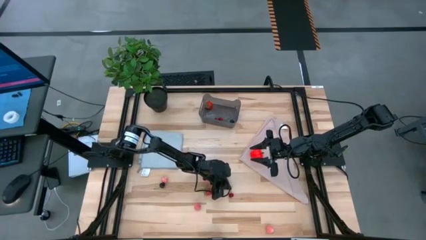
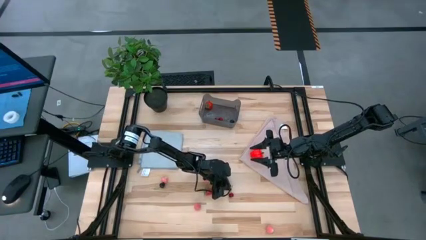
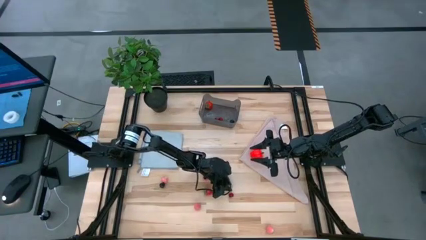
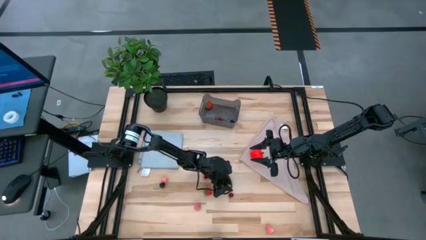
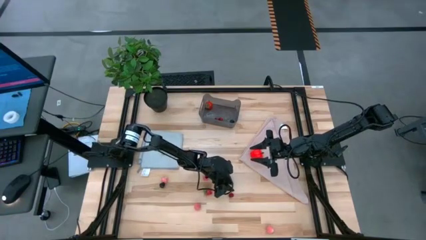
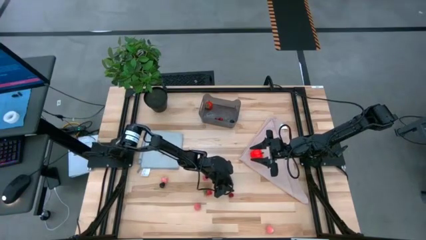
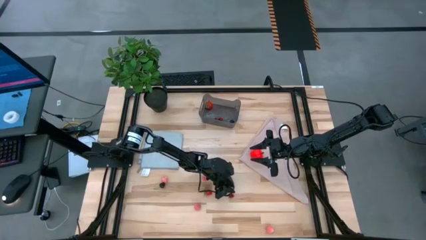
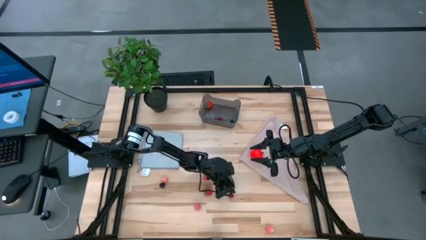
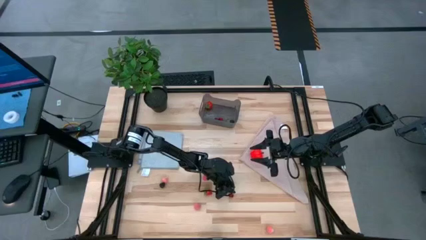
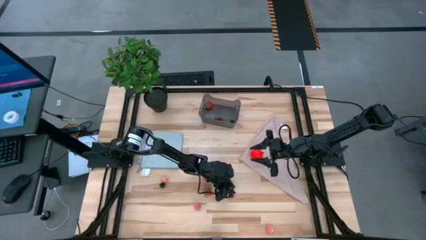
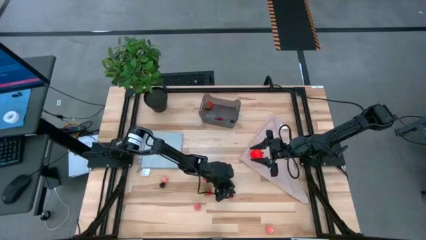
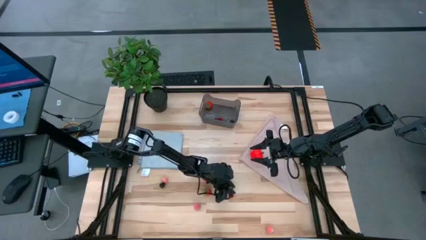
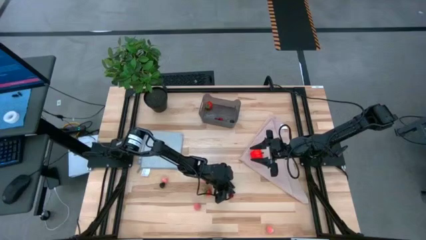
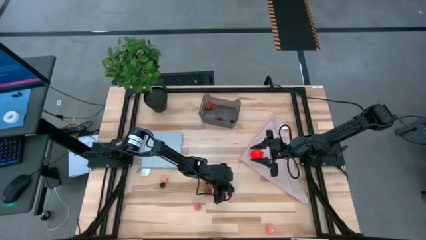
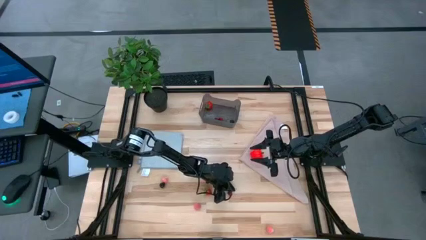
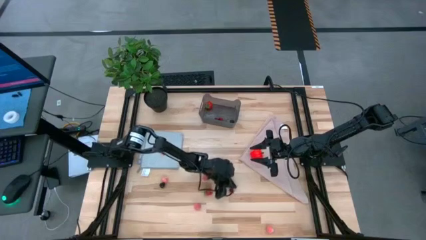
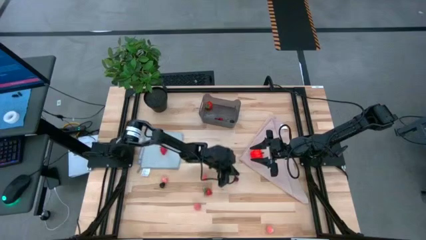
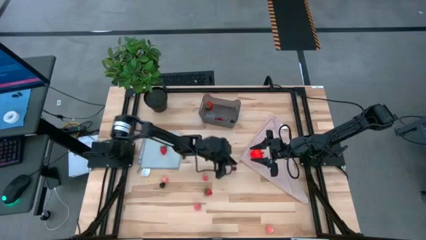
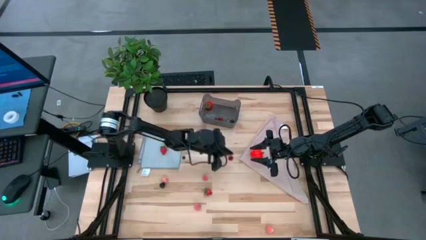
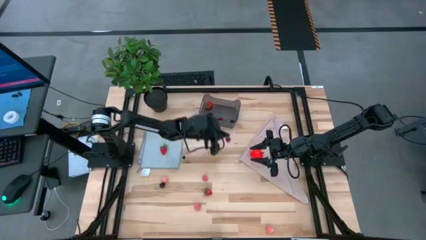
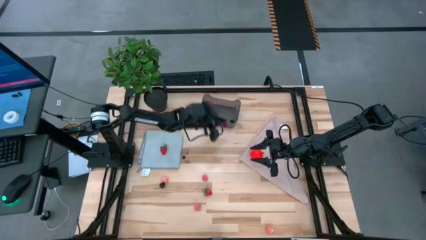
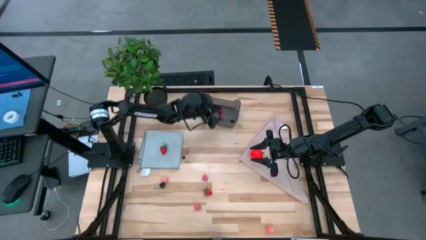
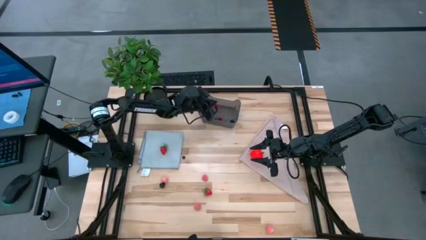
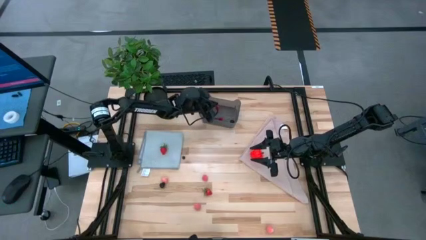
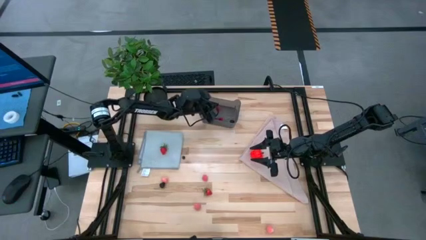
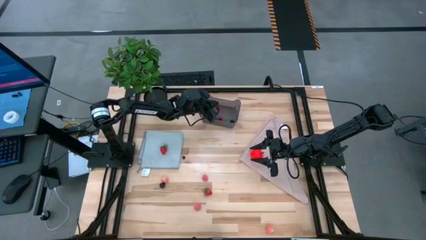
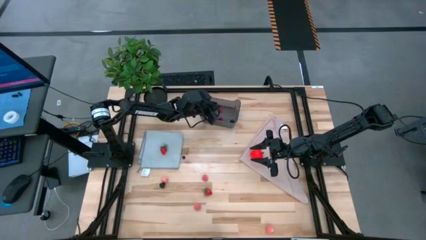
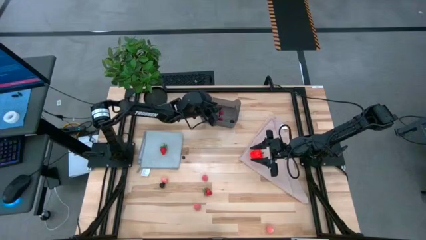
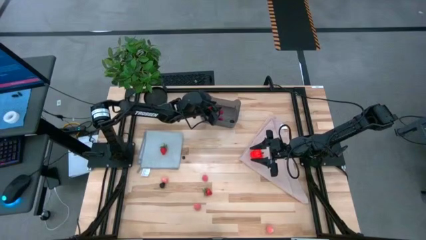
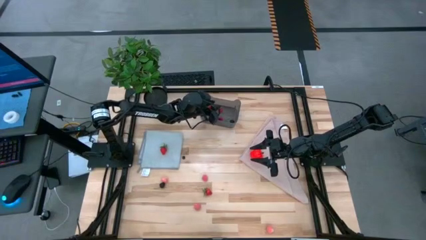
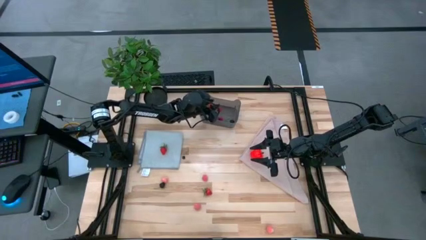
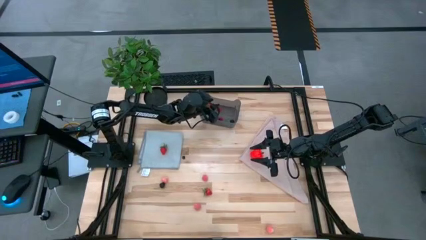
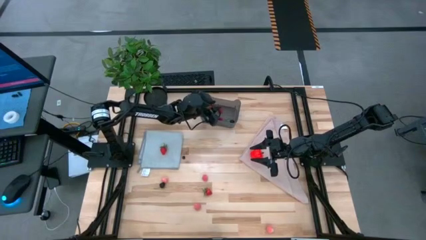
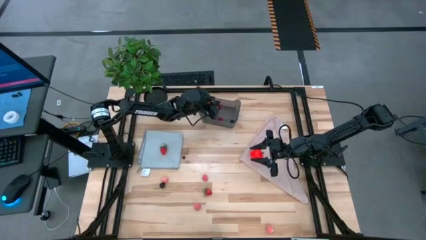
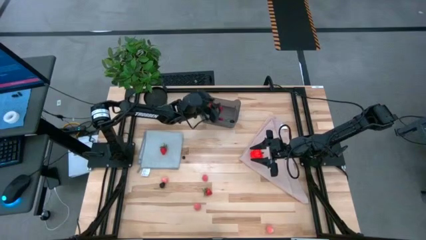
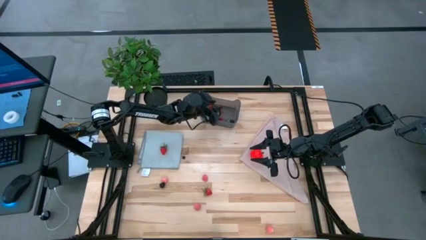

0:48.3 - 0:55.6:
Task: Pick and placing Produce into tupperware
Put the red cherry into the black bin

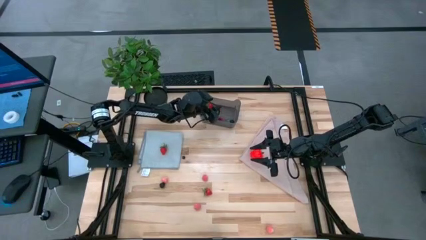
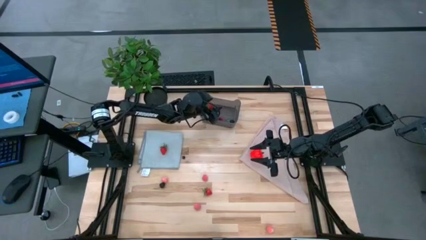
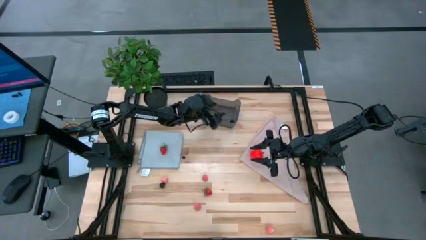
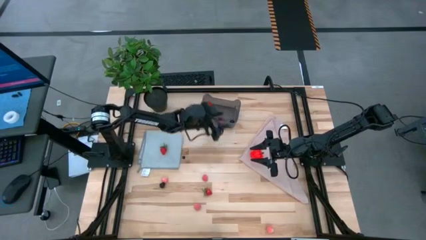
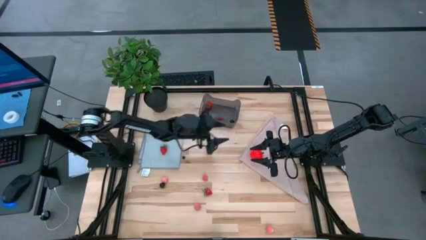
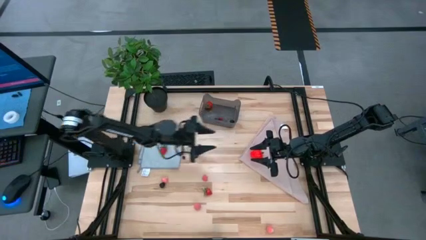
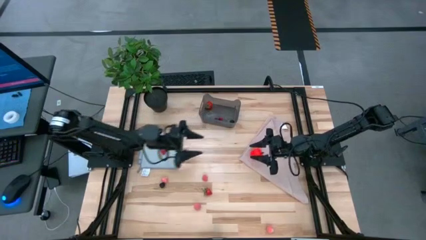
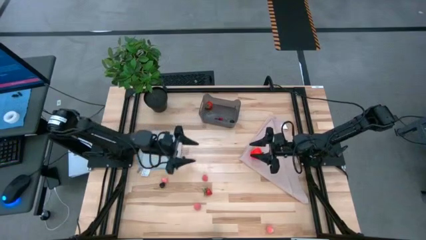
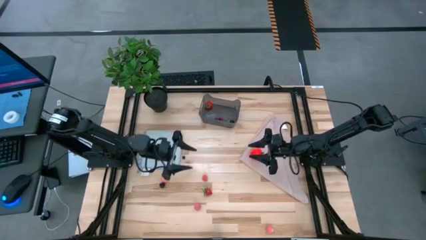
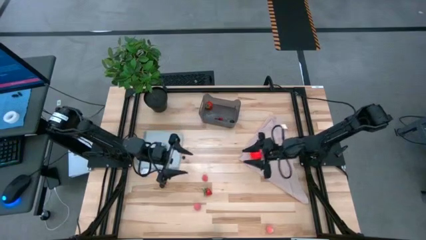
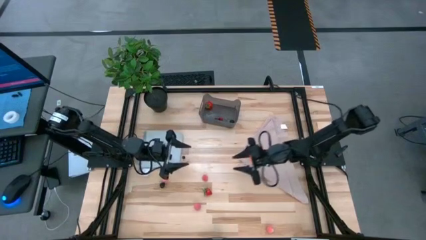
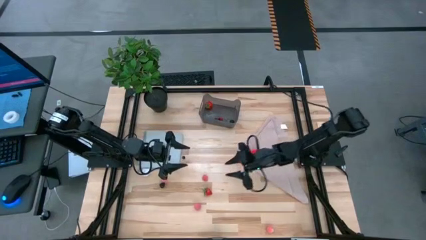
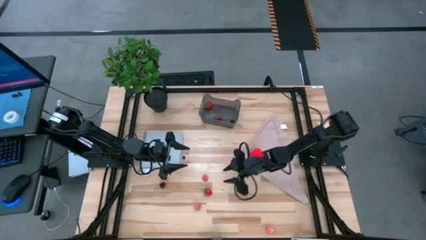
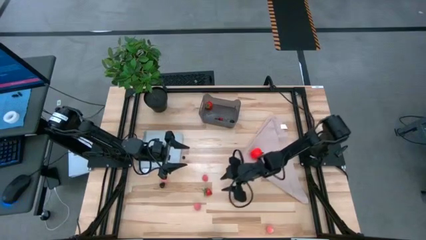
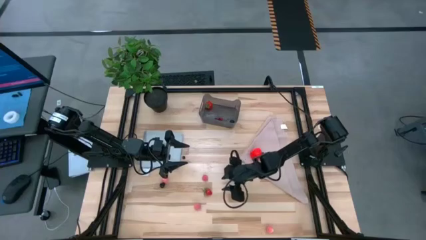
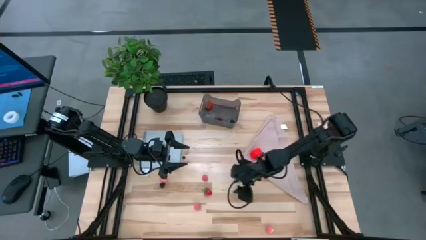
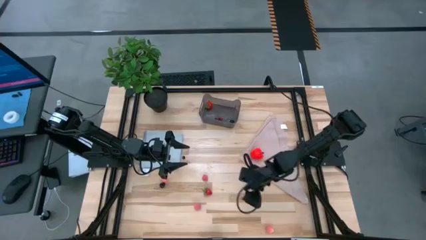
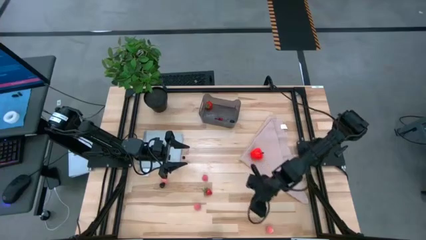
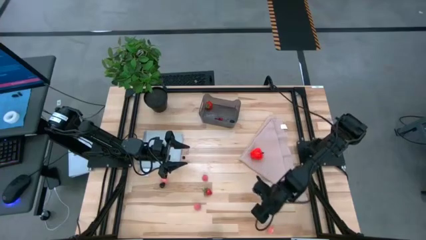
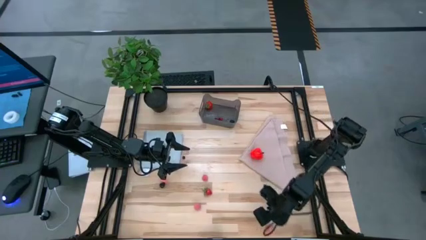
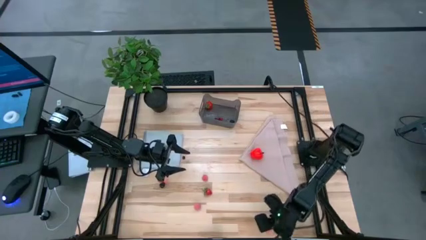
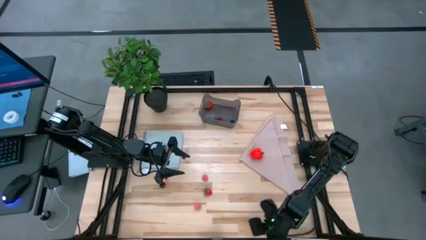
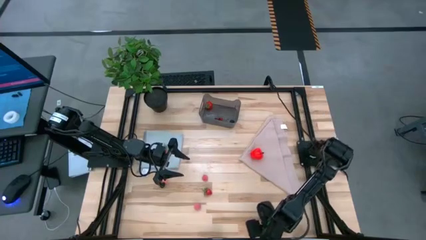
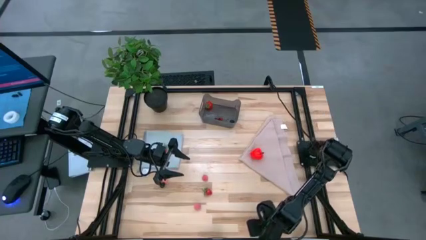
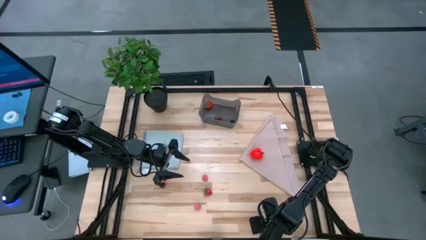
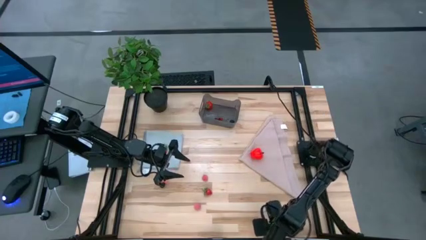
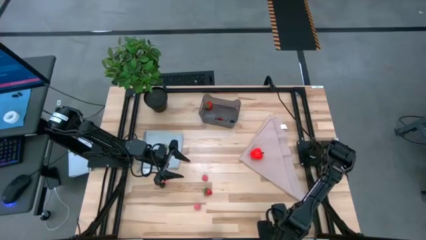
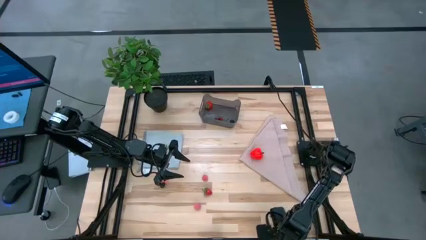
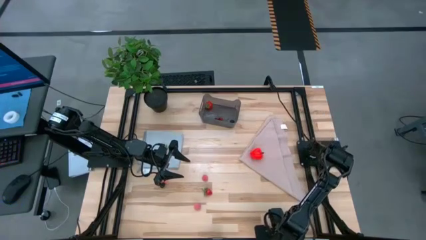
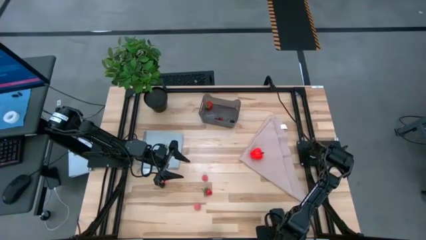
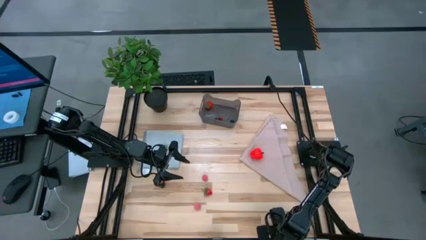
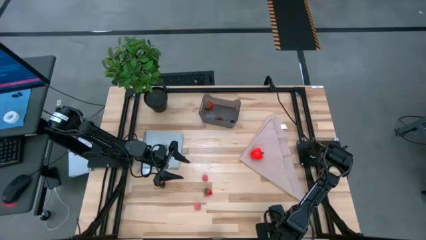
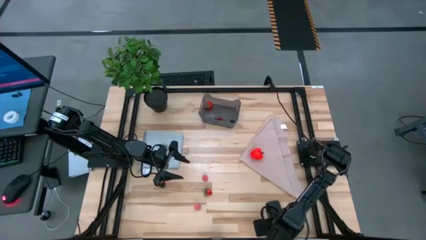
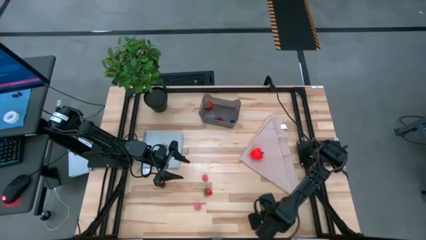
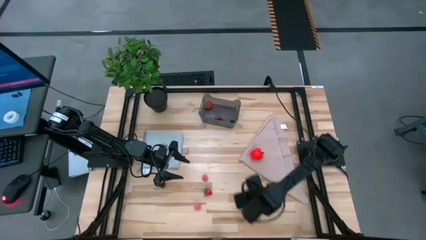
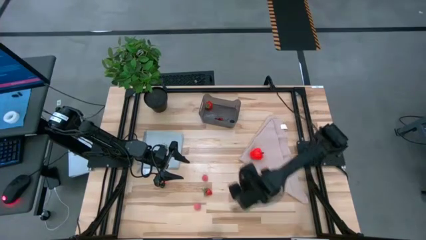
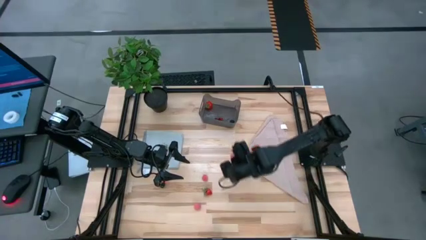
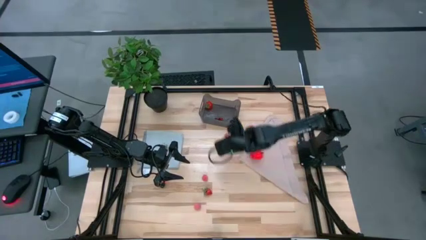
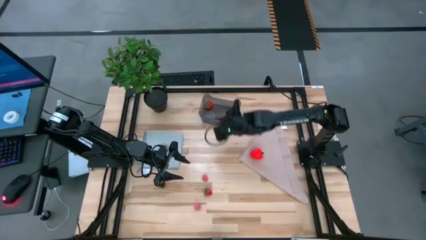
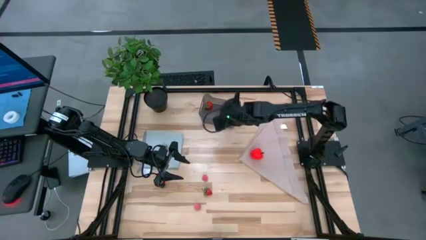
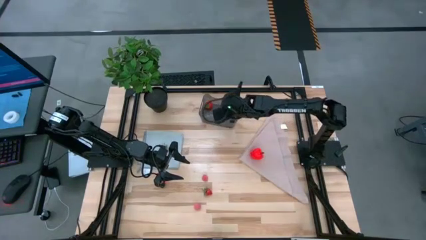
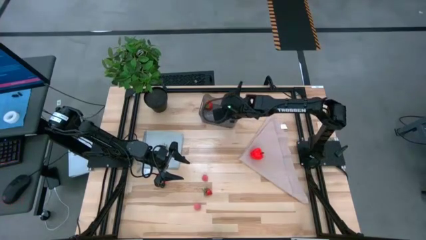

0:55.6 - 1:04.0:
Put the peach into the black bin
